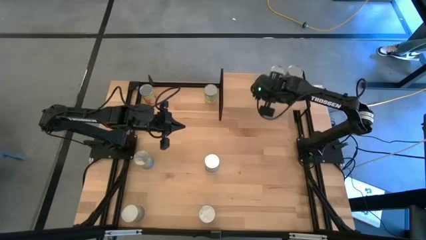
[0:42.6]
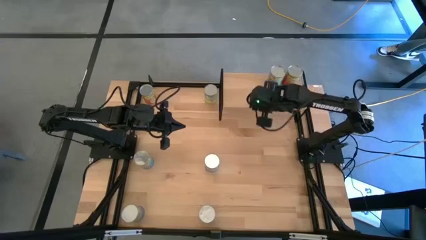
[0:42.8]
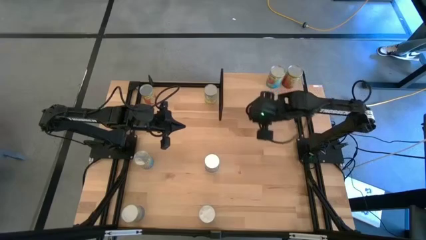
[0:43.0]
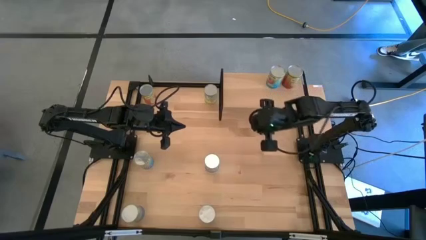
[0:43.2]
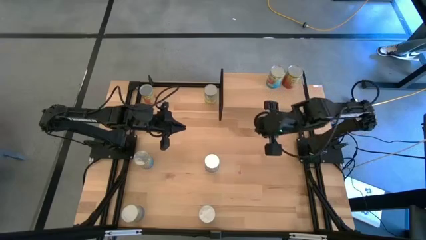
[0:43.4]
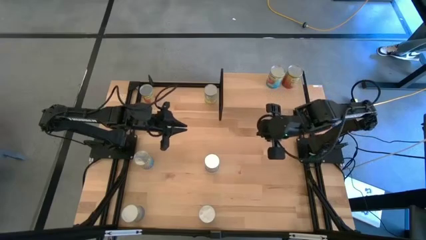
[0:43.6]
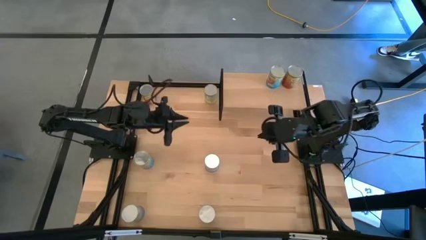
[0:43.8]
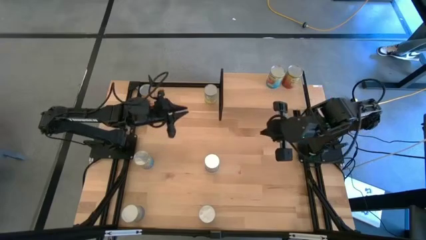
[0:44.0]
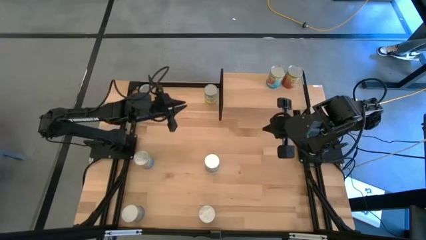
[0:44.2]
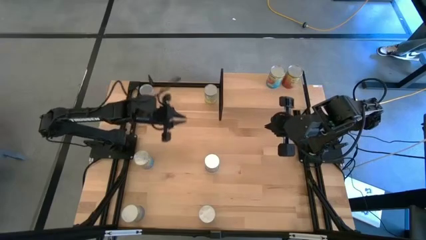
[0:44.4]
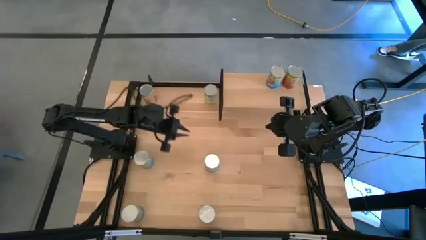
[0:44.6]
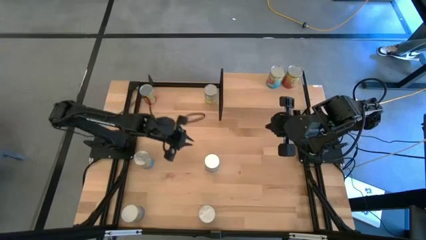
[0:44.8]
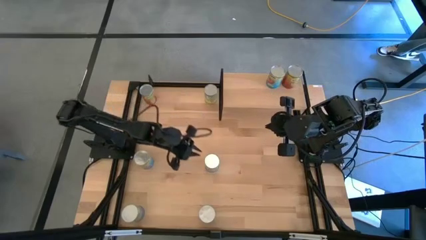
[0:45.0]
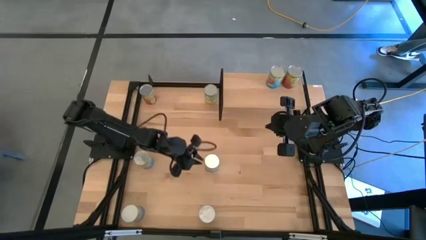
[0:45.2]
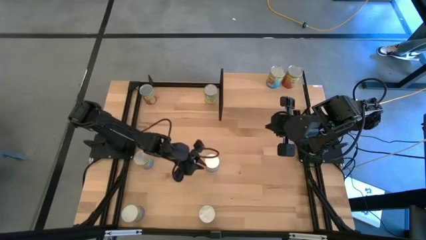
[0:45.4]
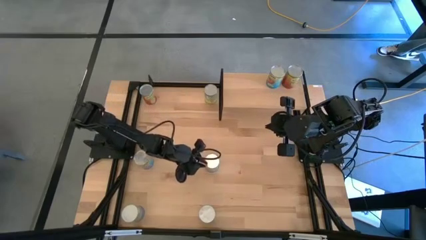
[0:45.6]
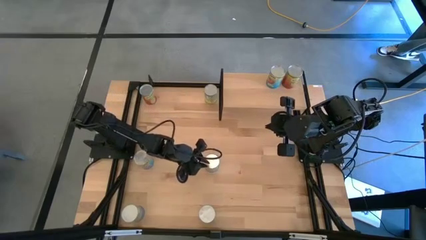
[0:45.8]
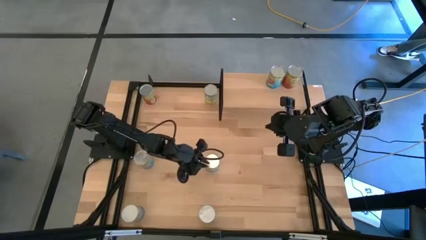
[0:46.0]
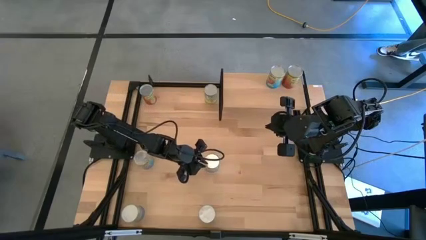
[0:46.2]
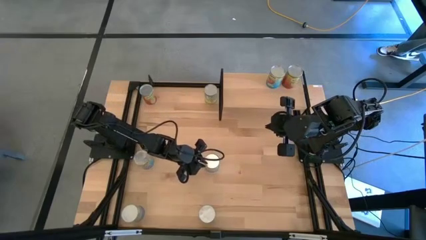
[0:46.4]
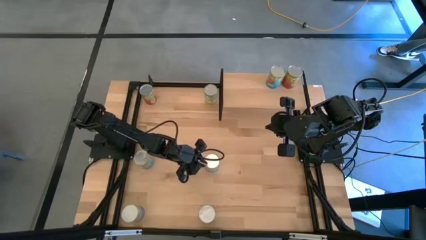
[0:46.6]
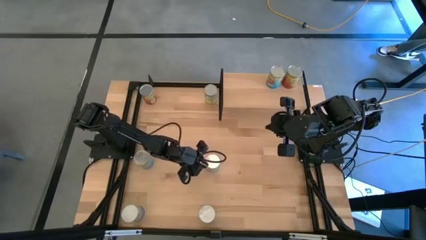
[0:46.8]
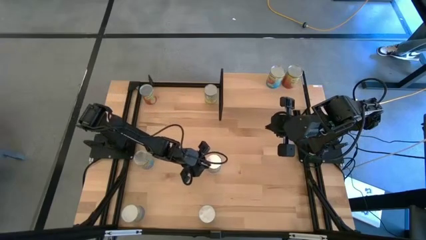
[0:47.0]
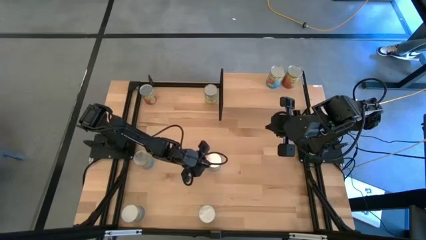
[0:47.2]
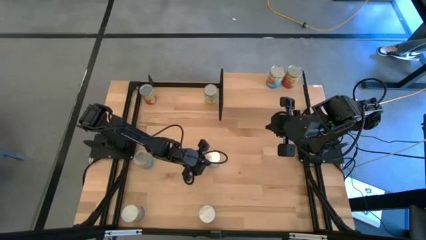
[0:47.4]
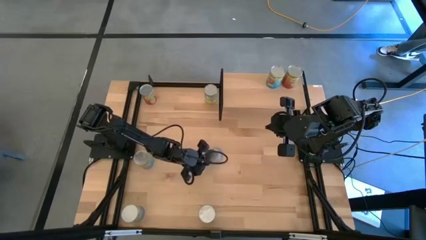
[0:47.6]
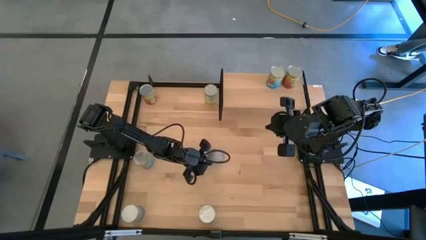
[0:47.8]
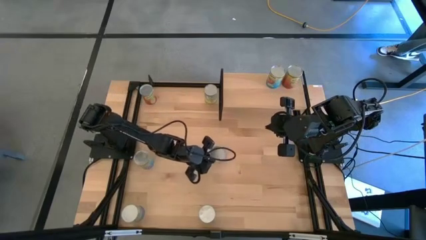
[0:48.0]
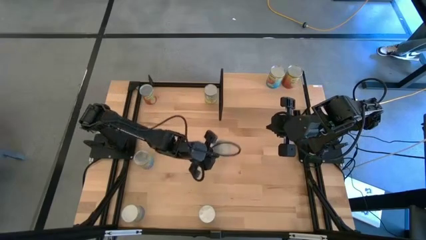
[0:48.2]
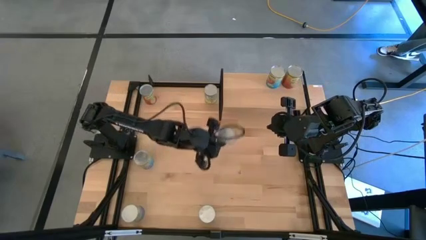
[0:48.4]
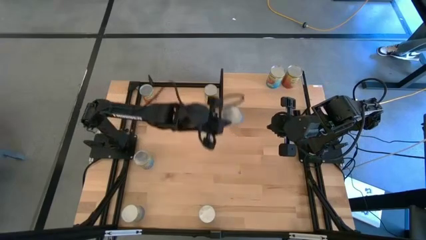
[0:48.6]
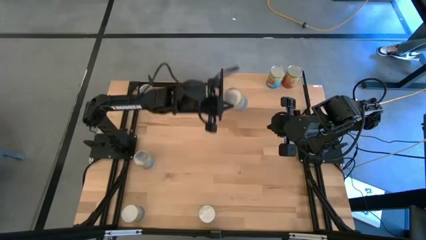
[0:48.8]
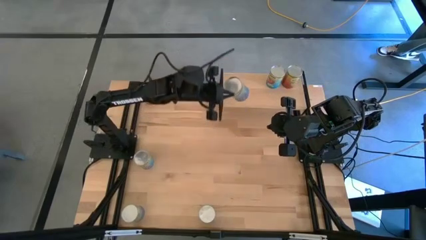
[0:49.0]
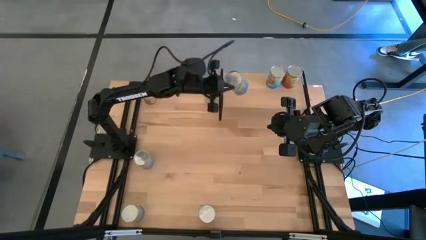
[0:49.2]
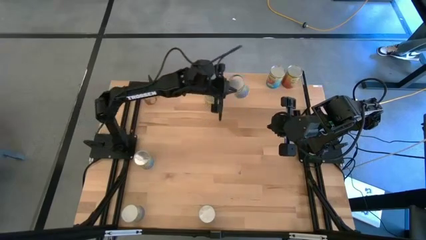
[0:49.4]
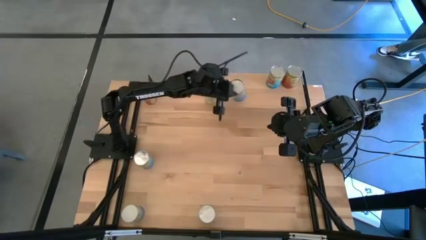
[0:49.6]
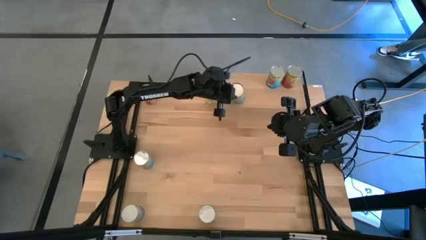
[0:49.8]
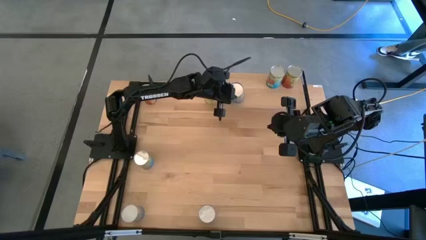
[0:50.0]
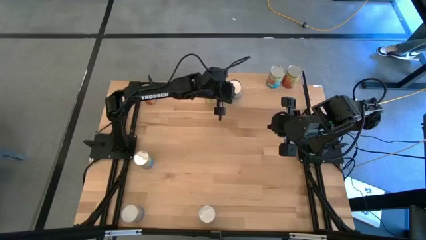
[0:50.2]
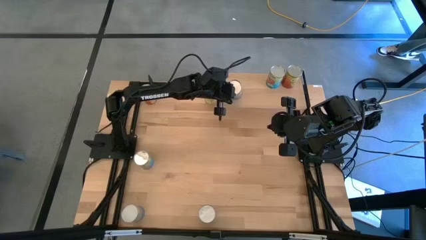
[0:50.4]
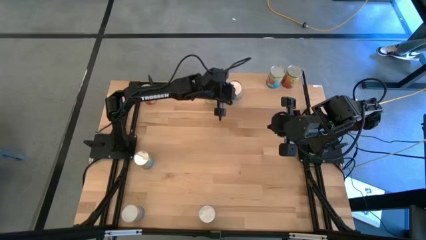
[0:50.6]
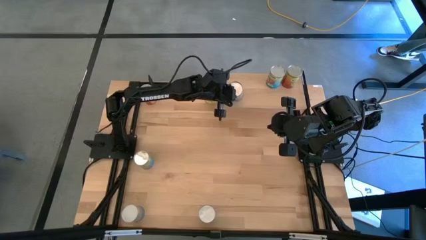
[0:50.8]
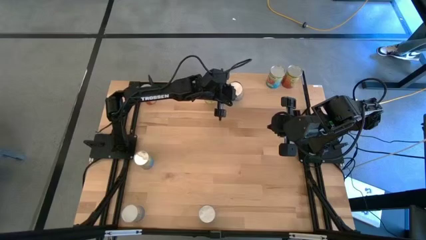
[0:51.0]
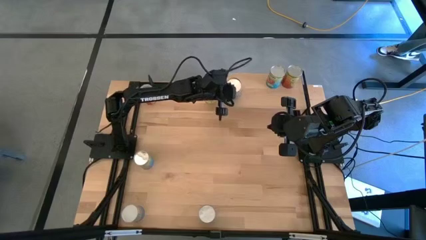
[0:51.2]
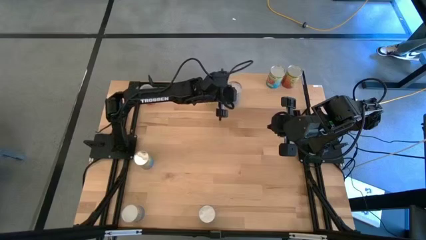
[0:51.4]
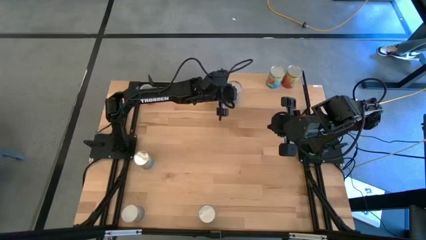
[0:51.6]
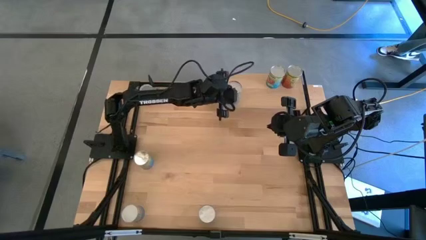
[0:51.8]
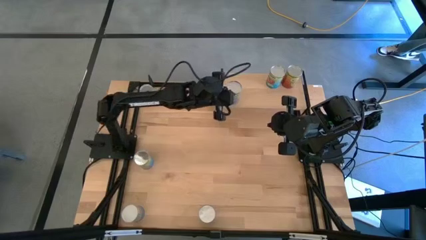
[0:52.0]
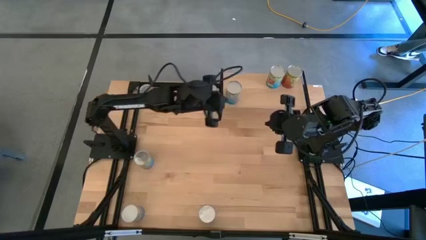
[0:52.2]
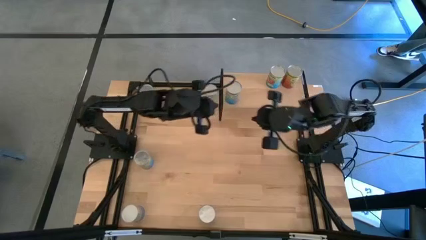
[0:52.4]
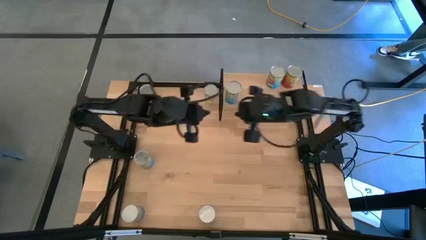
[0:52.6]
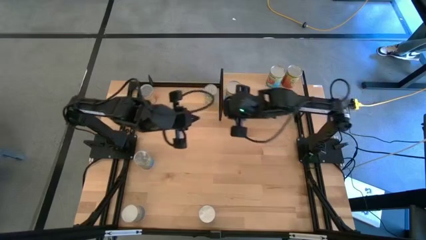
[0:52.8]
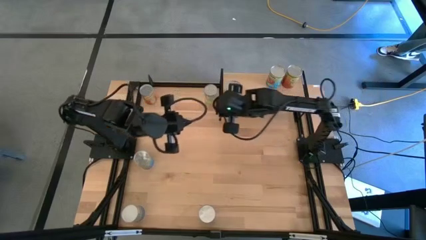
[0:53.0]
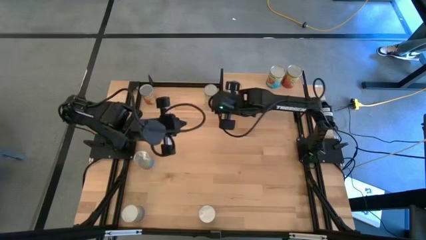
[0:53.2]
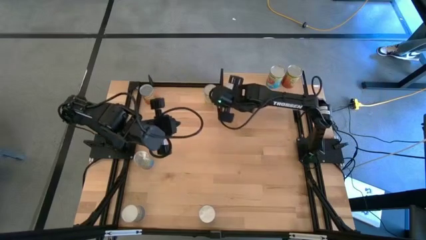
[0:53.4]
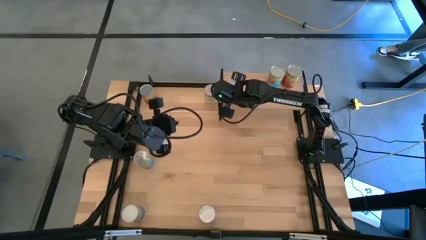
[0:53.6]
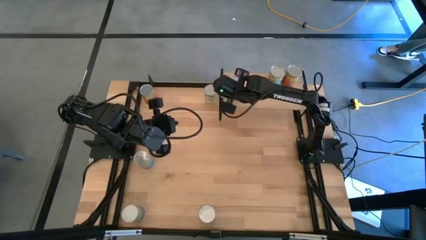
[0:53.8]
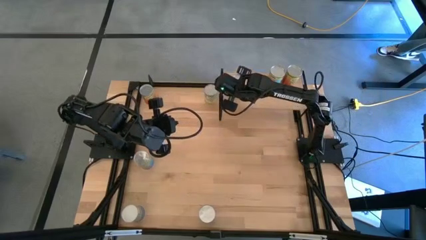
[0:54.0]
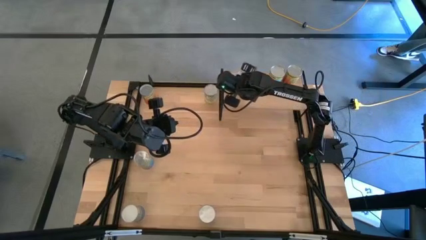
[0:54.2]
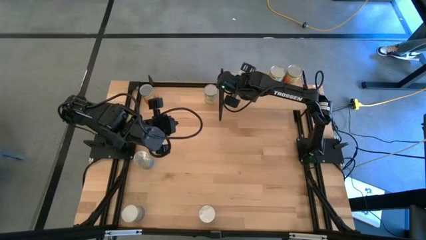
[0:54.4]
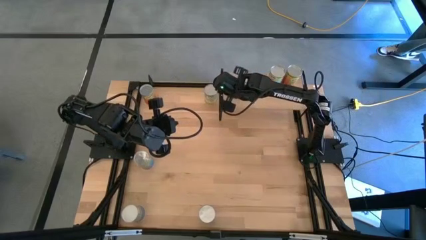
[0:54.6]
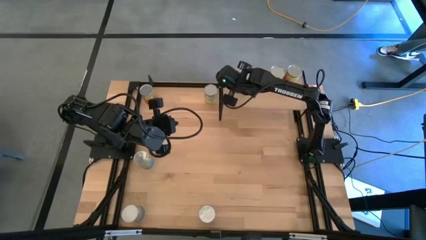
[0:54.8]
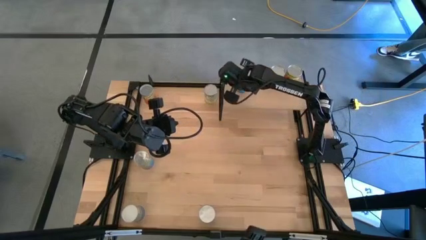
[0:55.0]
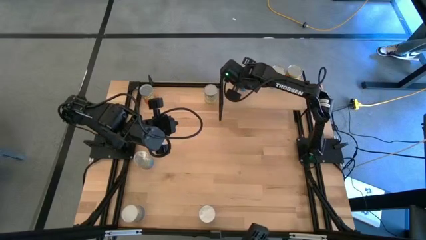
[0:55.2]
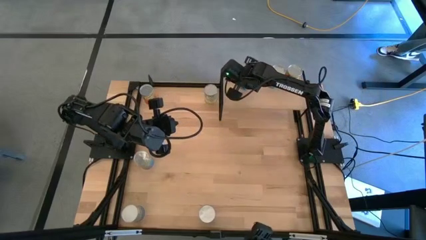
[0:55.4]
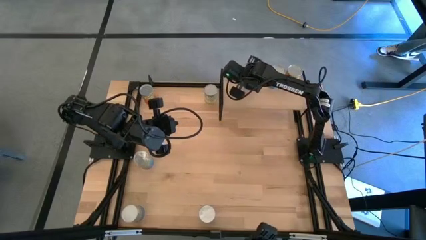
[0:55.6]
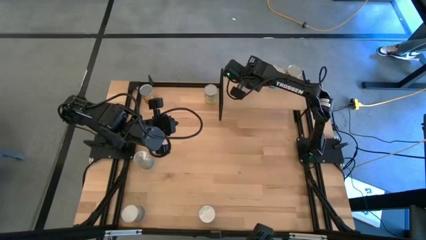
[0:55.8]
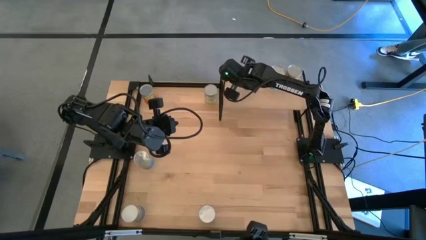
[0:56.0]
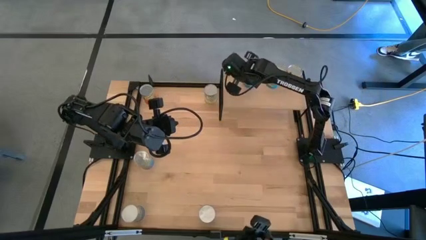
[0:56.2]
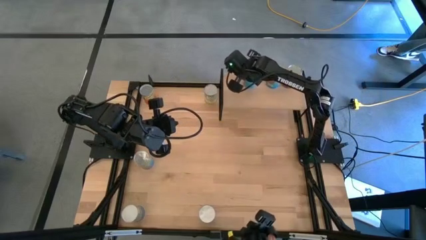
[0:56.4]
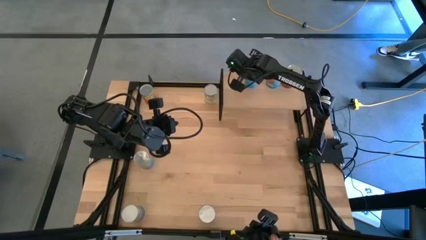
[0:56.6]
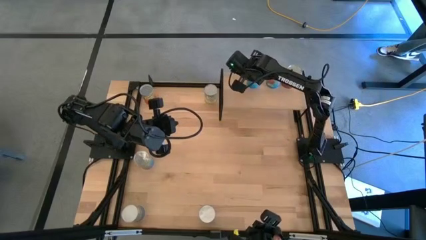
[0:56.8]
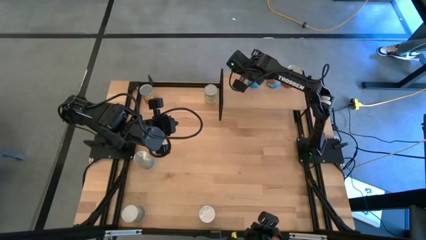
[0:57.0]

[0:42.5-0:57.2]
Task: Pick and place cans onto a shelf
Put the right canned cherries on the shelf

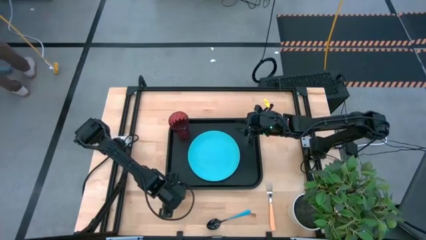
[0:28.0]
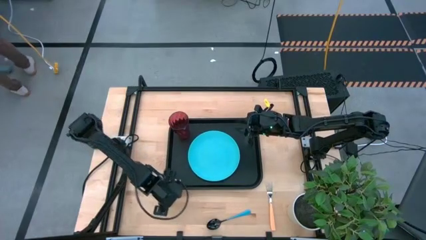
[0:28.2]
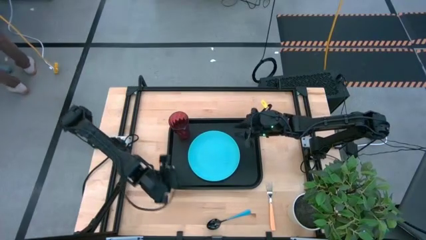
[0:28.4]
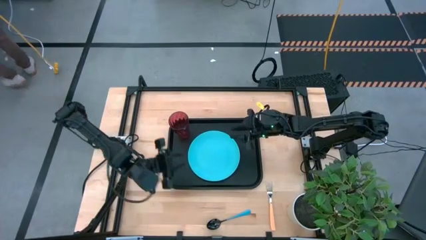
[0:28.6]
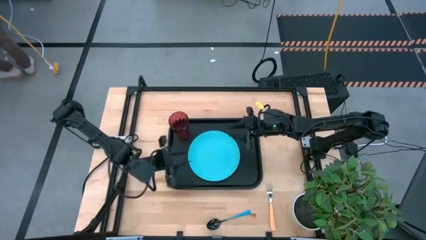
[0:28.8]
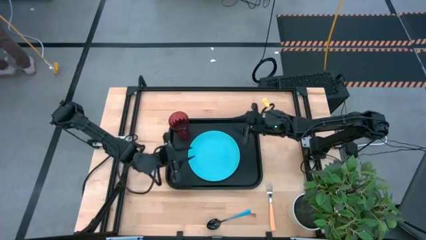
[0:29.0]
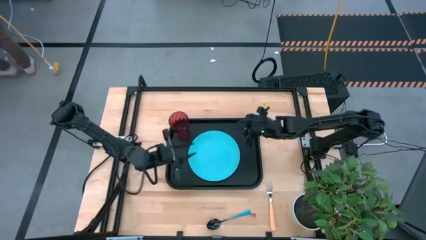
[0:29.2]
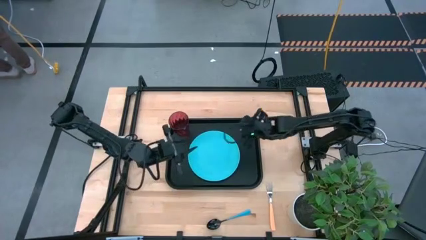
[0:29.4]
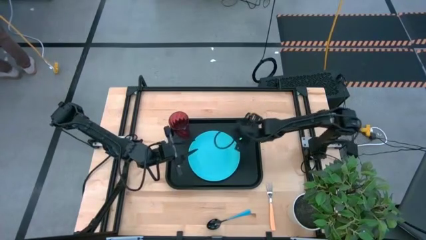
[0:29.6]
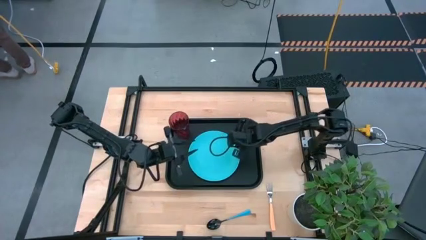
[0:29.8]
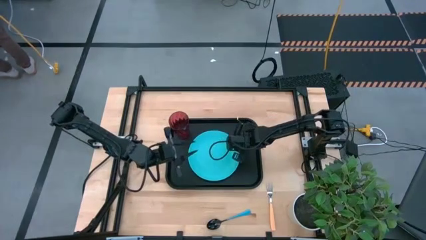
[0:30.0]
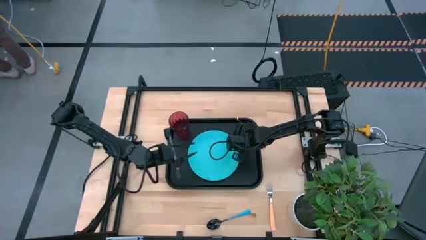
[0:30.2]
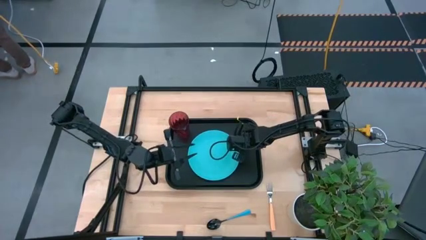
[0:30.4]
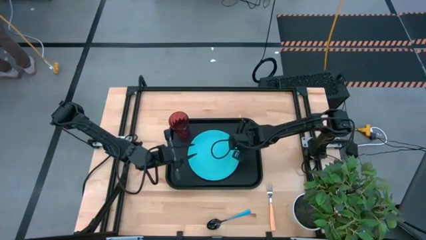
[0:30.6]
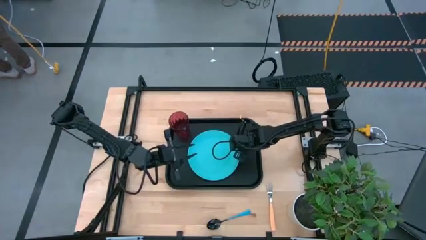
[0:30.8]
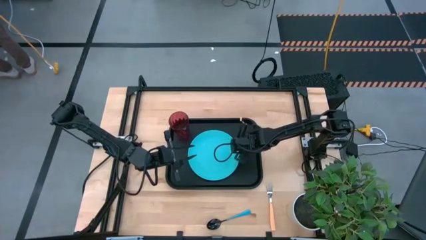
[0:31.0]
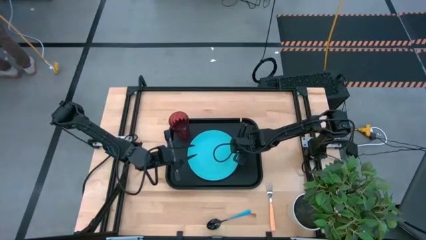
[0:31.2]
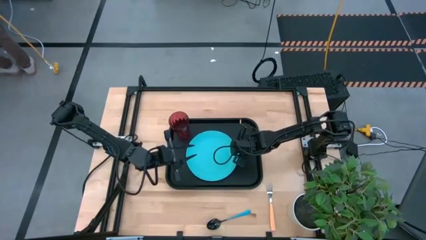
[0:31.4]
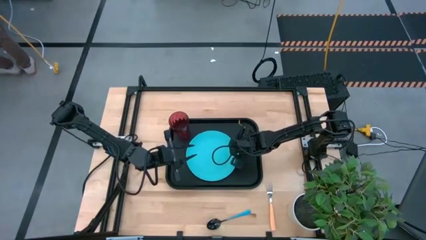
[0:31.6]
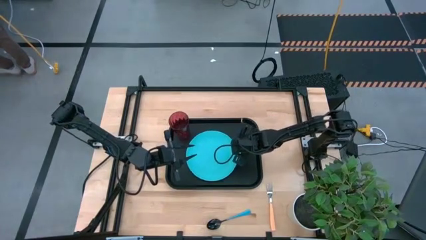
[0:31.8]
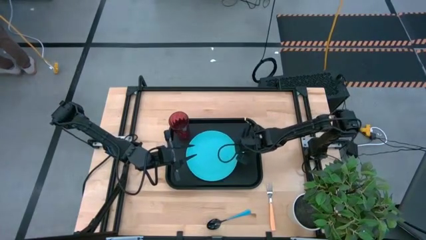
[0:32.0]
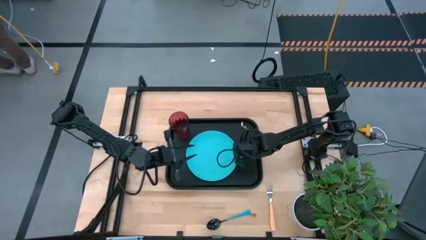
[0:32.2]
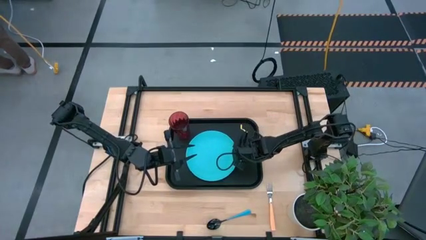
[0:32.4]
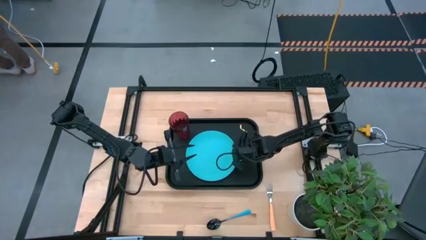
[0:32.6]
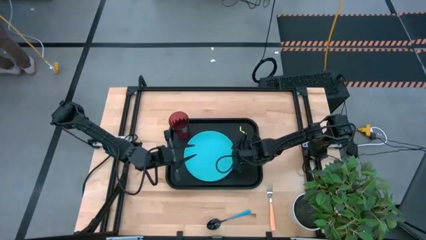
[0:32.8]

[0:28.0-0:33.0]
Task: Pick and place plate/cup/fork/spoon on tray
Adjust the blue plate
